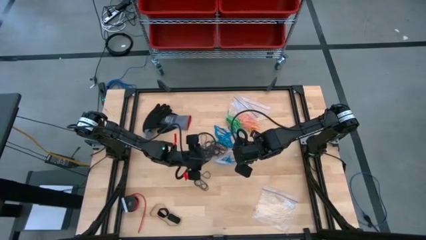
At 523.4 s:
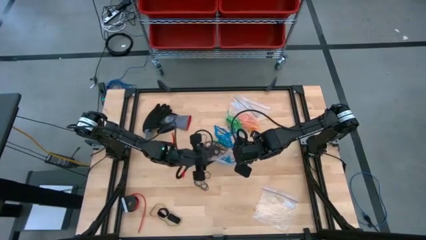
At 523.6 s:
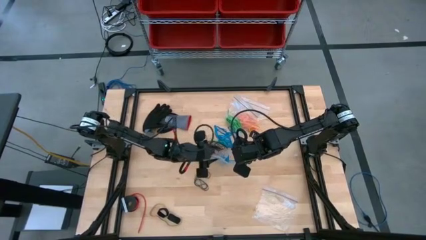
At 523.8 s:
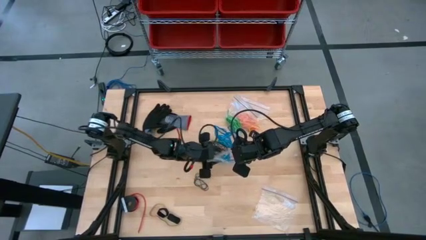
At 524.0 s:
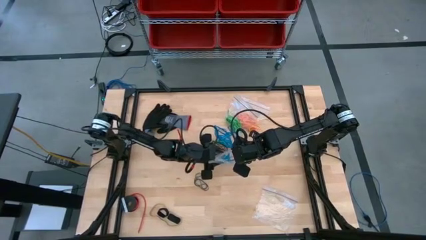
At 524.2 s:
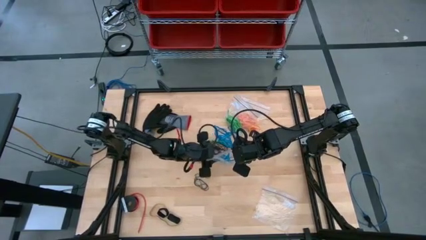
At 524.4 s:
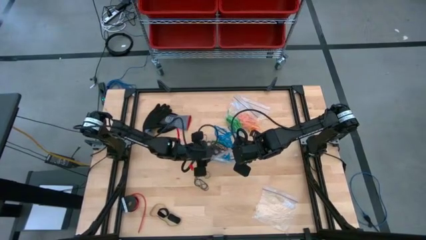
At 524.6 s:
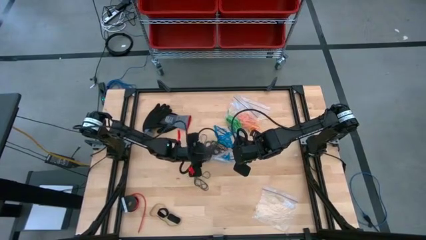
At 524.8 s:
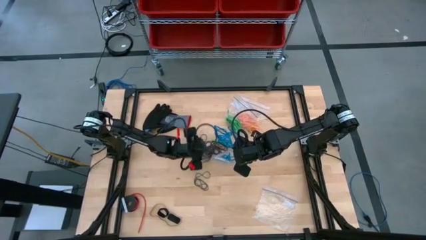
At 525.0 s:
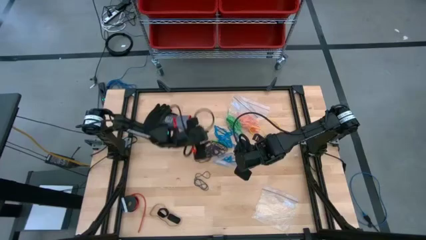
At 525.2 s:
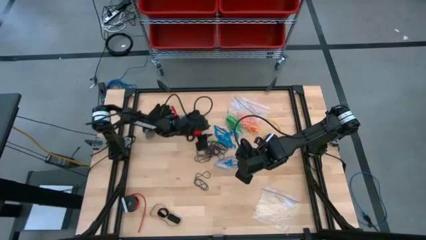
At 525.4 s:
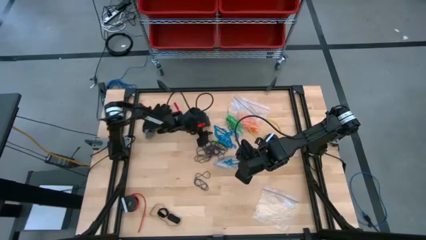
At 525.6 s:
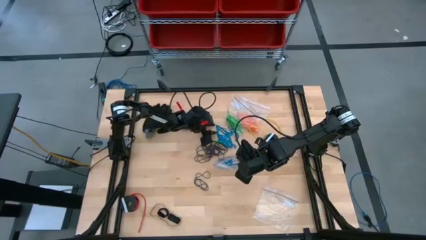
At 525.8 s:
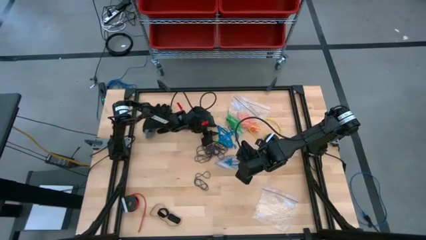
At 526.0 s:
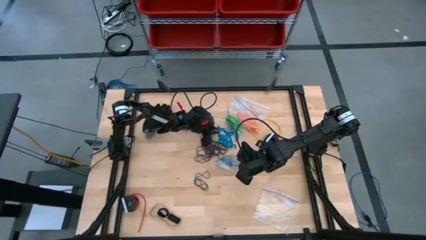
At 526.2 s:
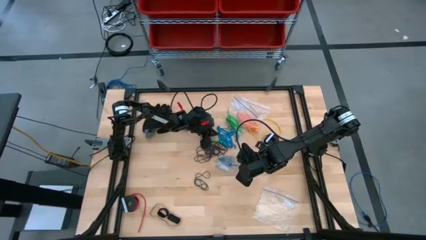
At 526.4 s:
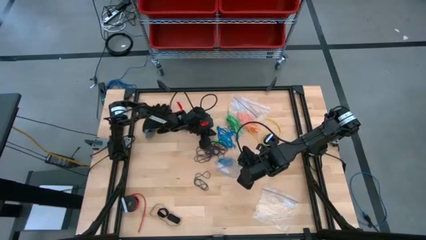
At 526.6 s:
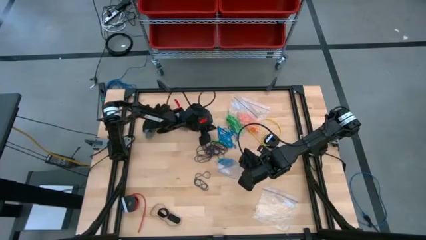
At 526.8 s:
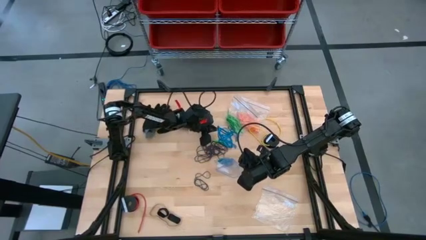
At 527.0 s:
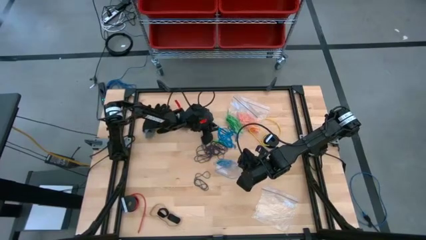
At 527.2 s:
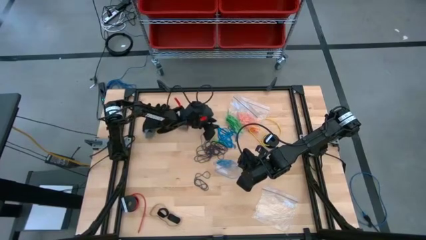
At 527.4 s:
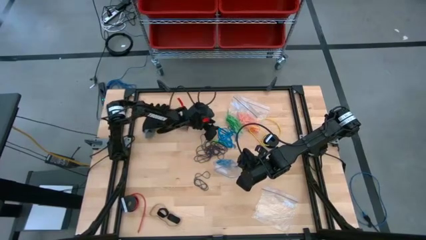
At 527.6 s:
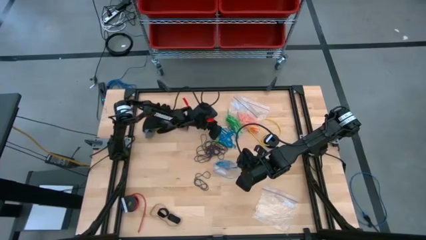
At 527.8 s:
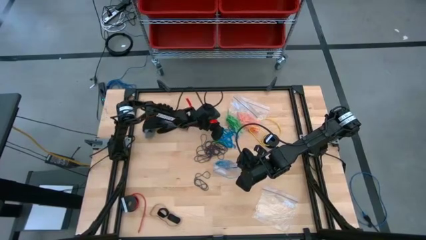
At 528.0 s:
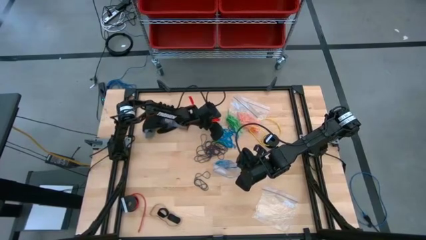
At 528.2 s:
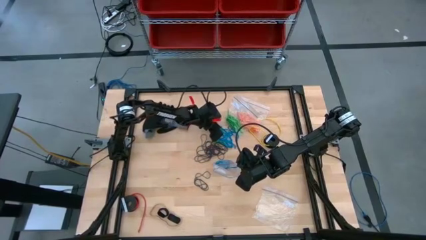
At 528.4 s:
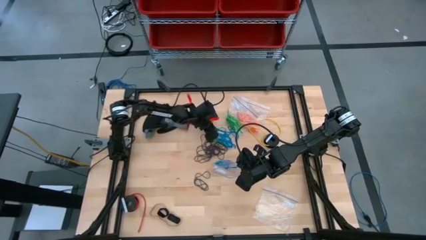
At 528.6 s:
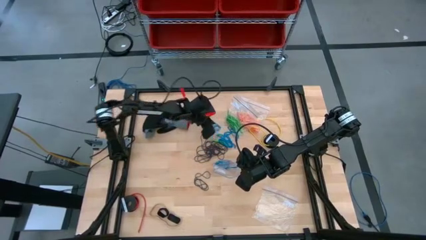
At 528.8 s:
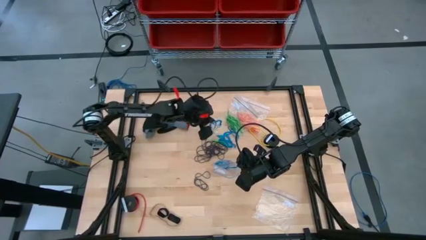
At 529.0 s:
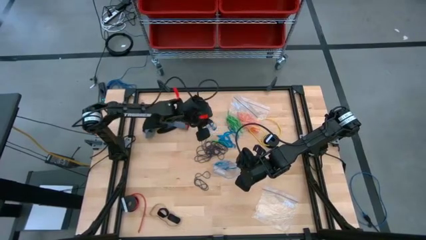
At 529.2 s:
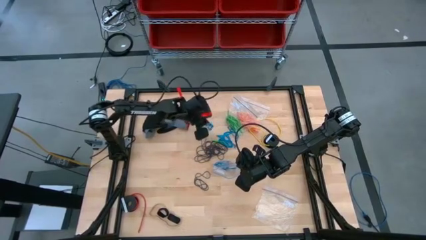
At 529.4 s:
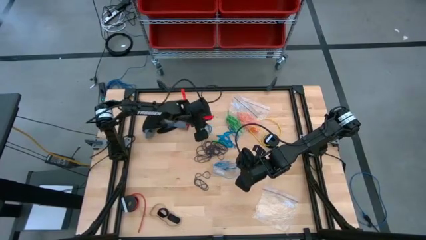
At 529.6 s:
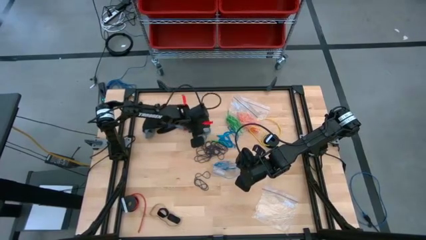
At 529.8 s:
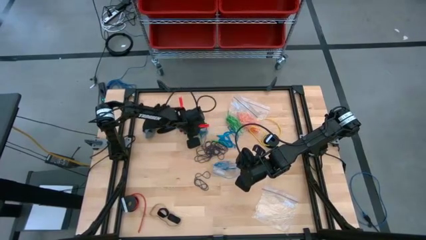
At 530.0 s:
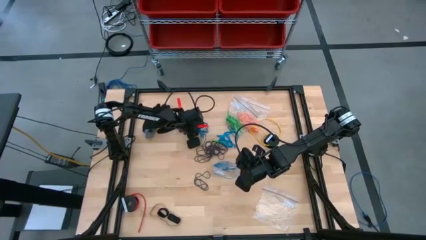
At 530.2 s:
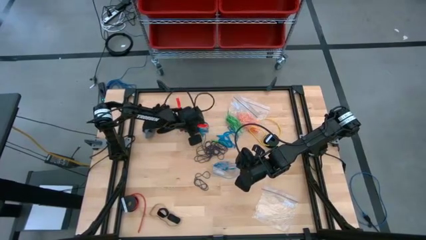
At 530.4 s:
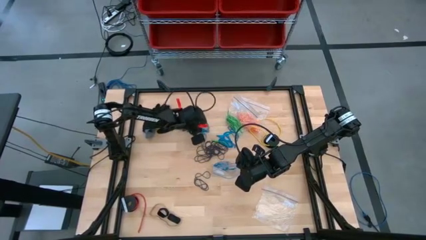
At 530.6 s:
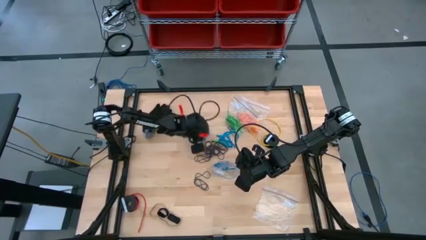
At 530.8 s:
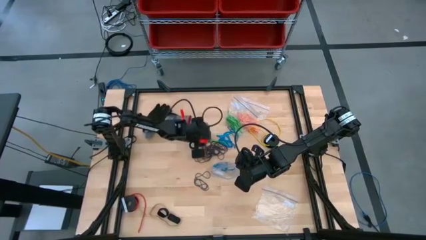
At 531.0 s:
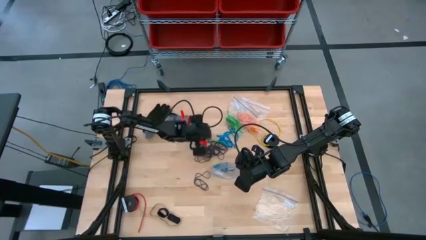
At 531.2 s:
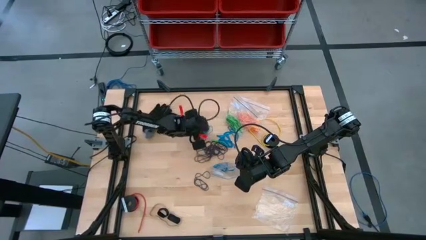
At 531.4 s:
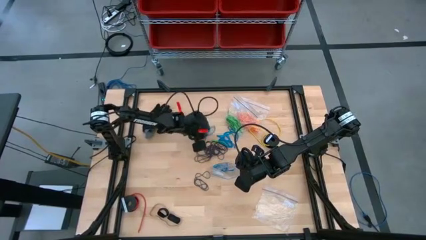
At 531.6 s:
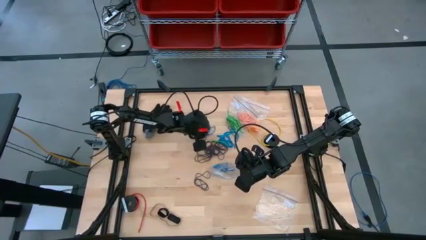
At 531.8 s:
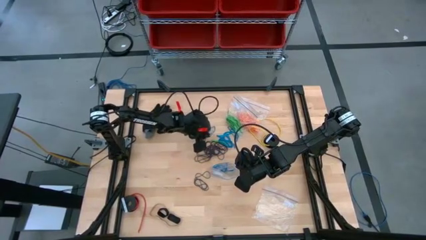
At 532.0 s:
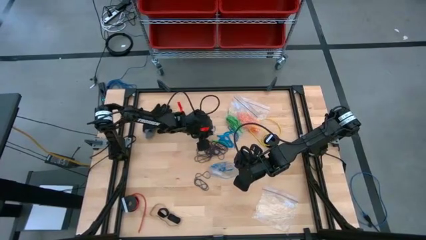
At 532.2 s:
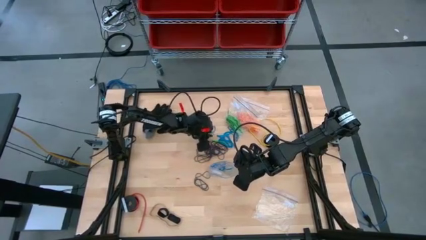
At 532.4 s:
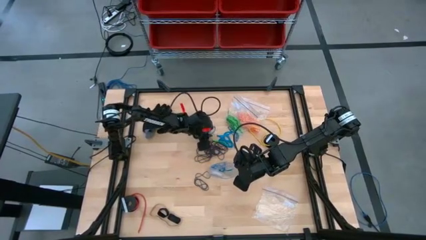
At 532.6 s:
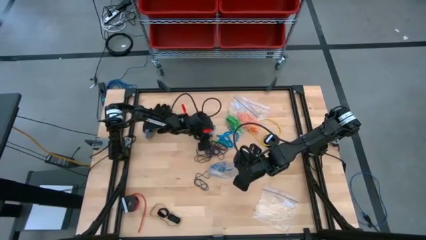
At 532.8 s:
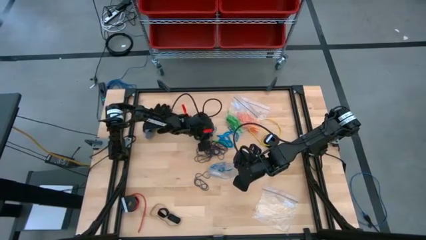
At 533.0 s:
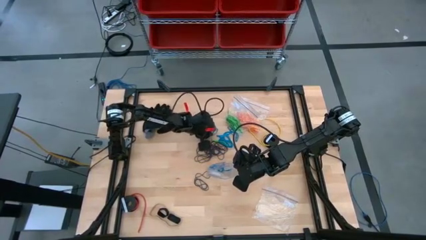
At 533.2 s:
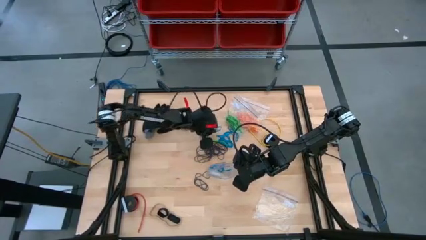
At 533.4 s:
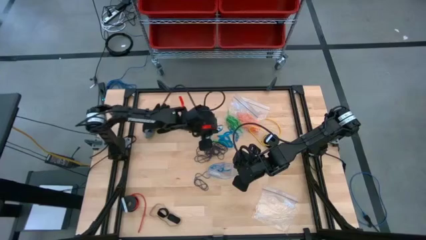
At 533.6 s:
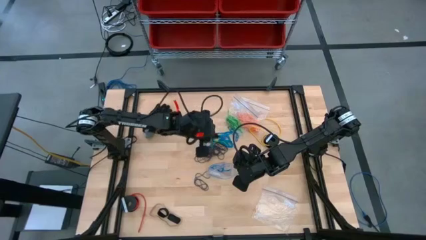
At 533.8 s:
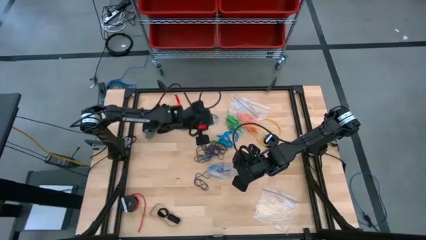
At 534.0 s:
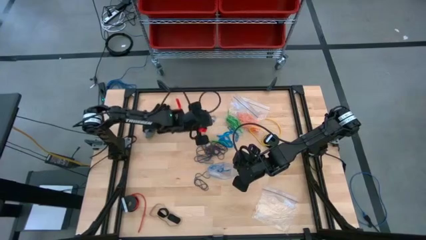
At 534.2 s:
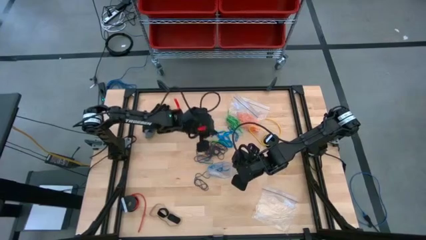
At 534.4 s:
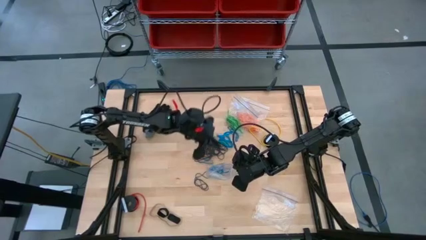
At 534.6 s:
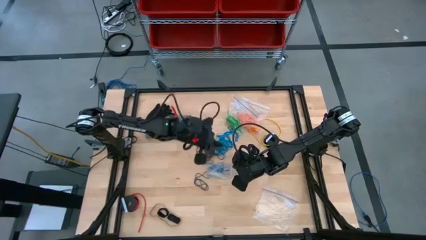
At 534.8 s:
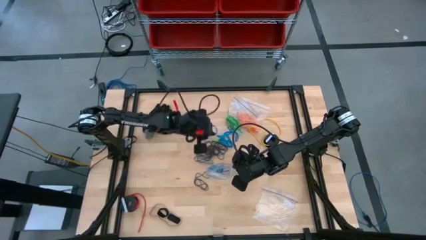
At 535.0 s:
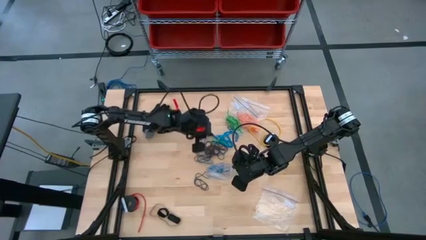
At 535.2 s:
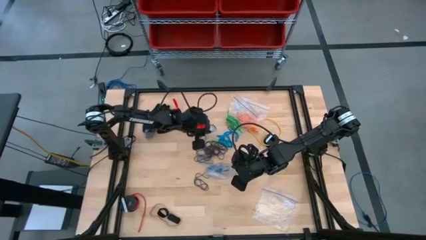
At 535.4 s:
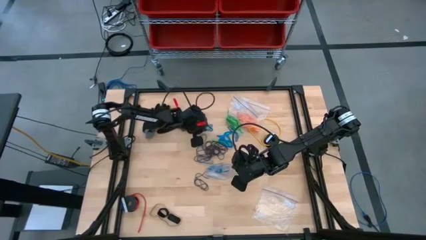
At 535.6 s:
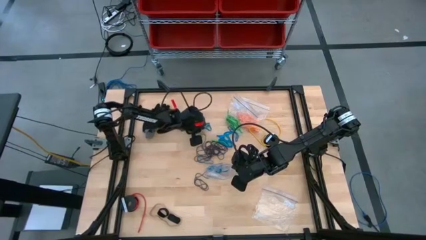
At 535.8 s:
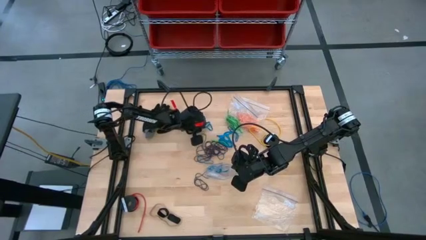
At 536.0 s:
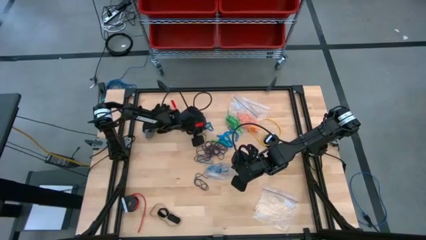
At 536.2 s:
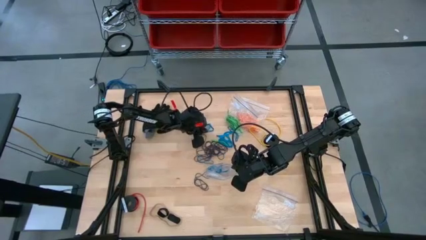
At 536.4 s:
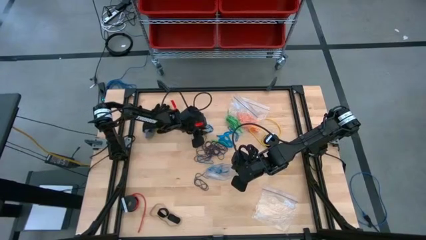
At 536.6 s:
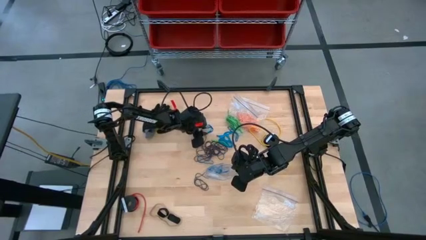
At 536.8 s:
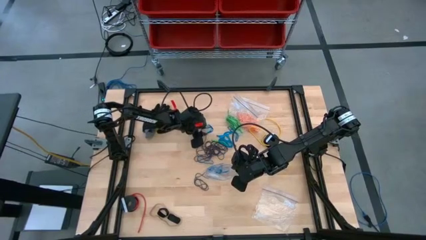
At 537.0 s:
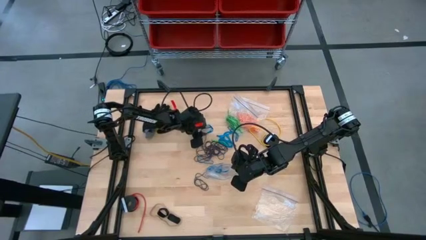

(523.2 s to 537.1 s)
Task: Sort rubber bands
Put the blue rubber band into the transparent zip bag

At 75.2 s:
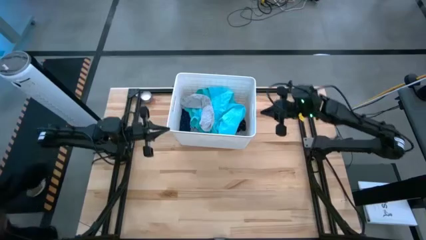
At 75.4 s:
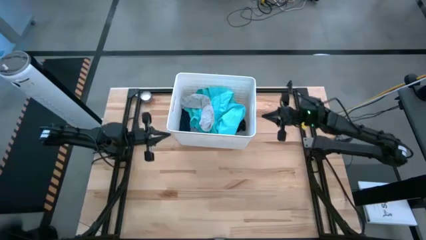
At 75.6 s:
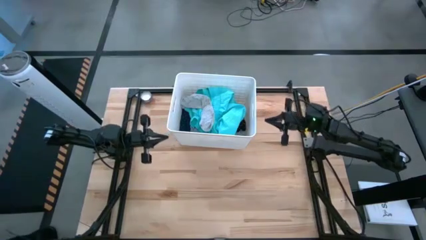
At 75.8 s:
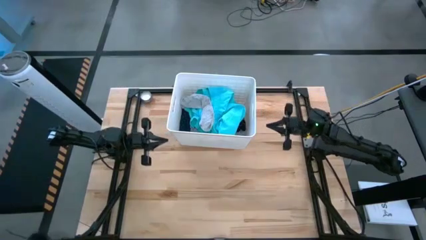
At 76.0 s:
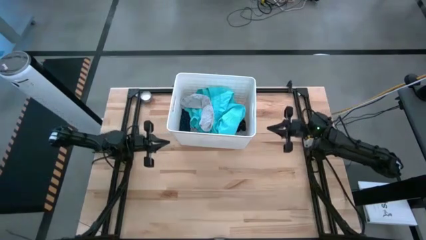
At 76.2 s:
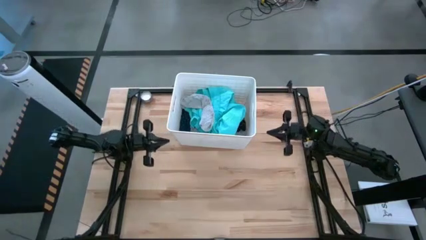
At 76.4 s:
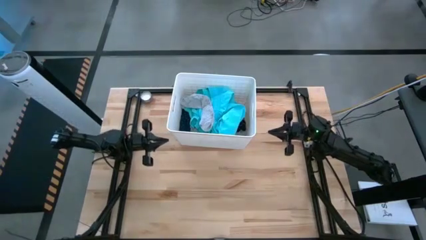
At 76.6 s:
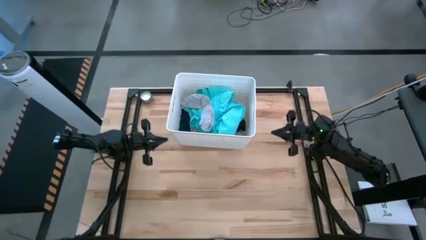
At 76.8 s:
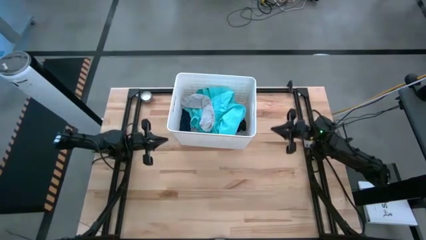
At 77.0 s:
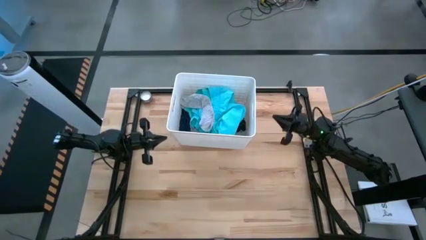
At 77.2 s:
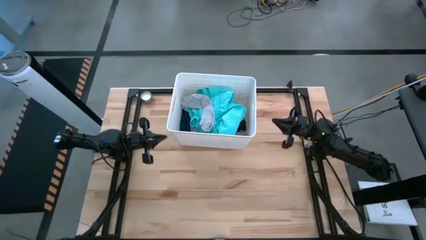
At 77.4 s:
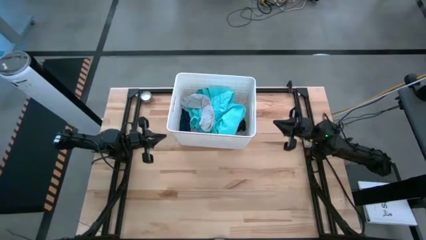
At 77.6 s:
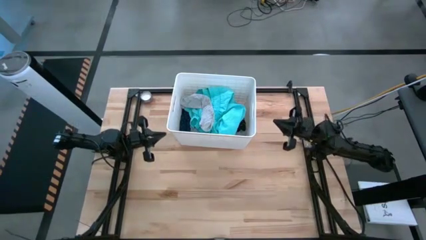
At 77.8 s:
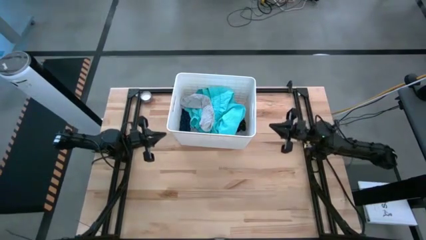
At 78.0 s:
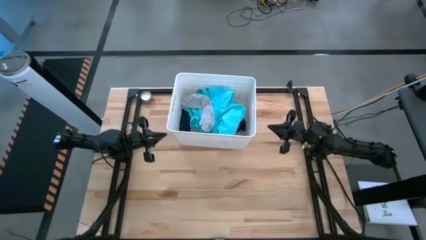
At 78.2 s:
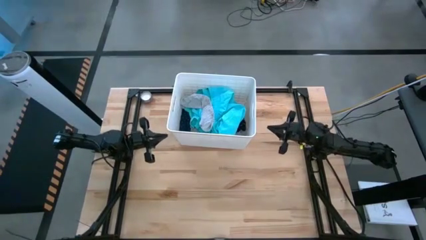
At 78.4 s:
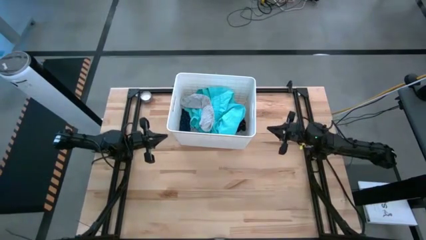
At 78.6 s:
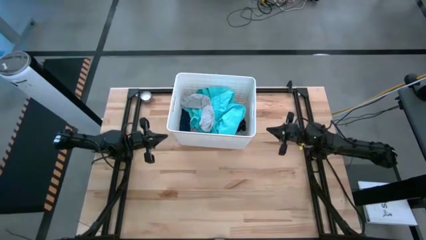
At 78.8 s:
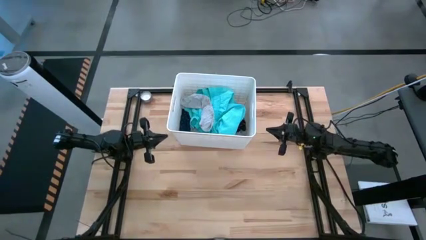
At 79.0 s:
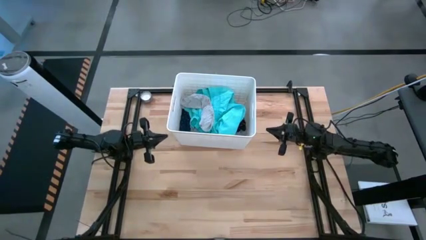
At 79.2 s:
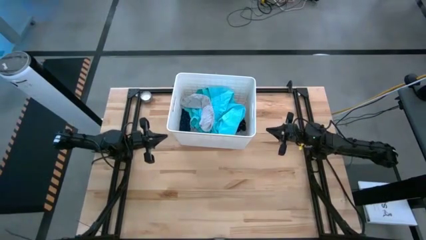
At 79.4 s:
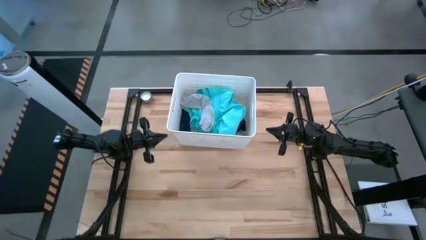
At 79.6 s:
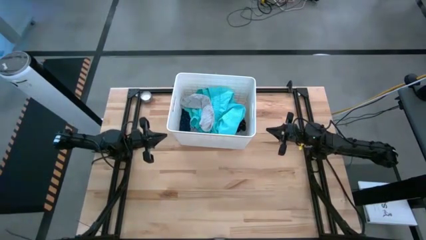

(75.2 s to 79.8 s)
Task: Sort clothes
Return to Home Position
